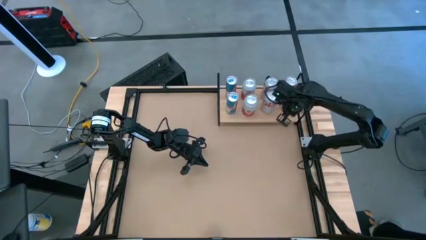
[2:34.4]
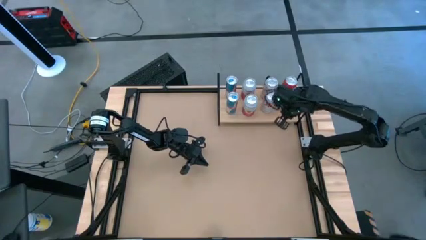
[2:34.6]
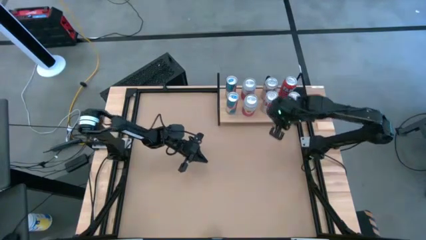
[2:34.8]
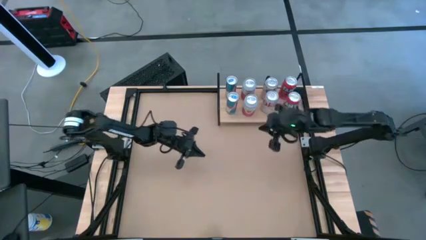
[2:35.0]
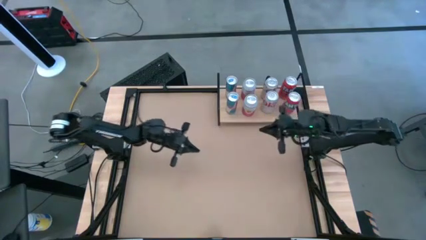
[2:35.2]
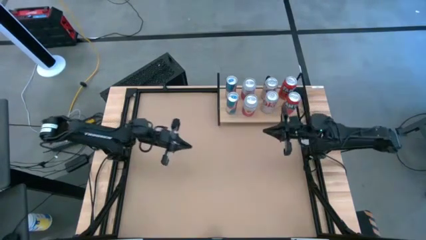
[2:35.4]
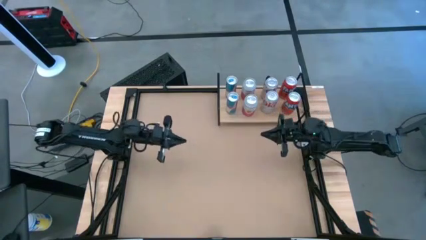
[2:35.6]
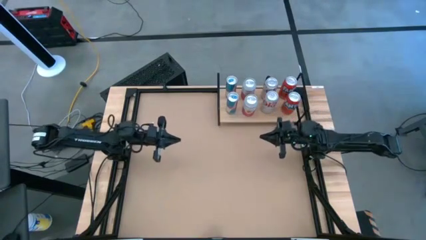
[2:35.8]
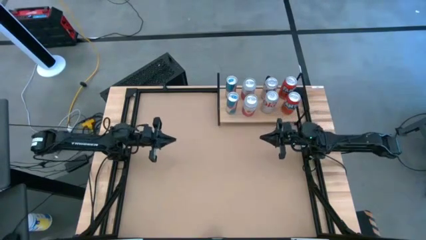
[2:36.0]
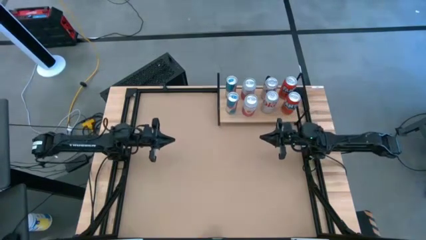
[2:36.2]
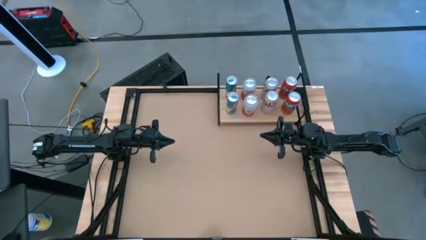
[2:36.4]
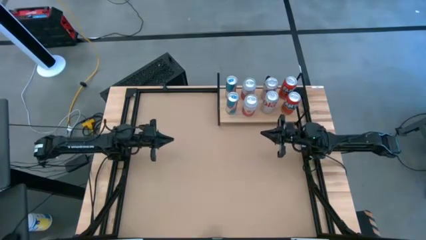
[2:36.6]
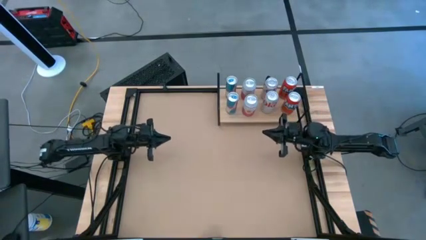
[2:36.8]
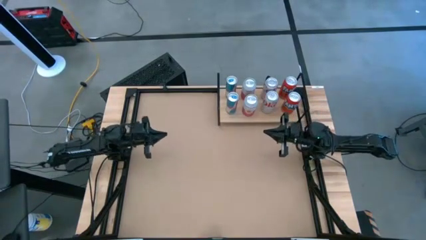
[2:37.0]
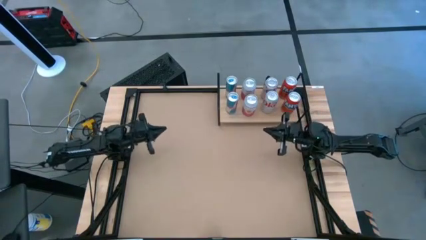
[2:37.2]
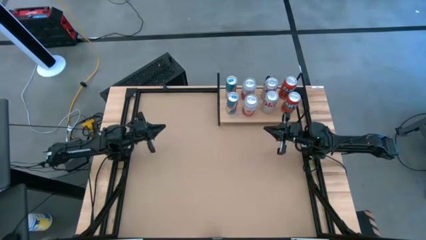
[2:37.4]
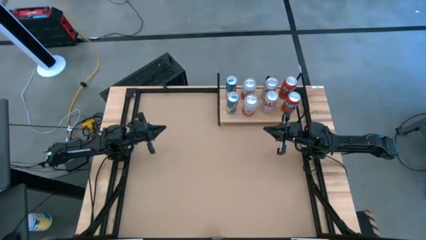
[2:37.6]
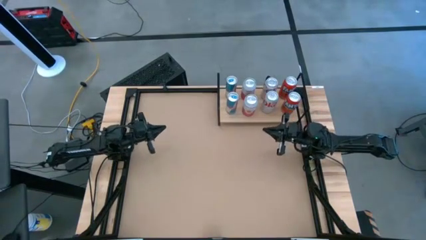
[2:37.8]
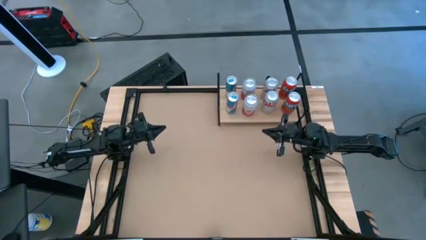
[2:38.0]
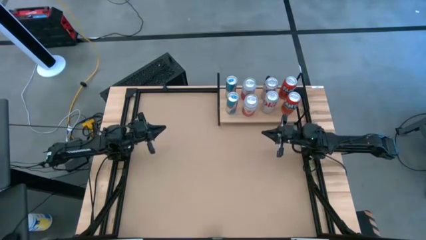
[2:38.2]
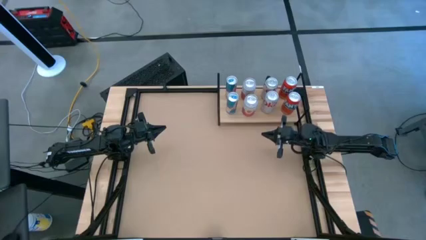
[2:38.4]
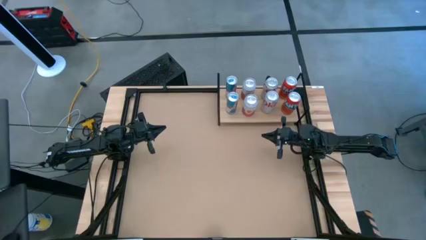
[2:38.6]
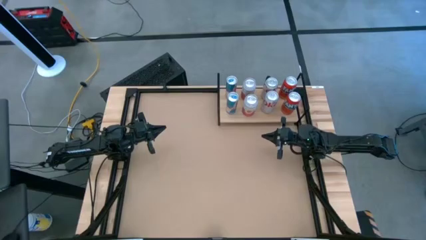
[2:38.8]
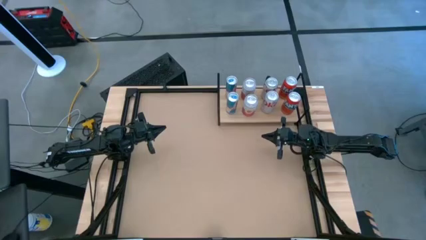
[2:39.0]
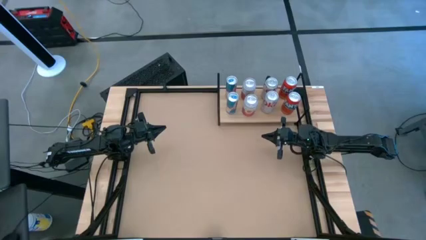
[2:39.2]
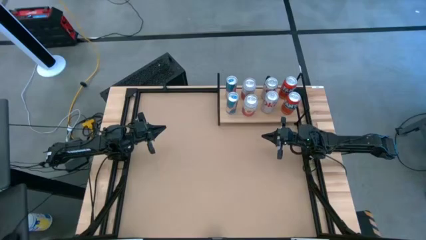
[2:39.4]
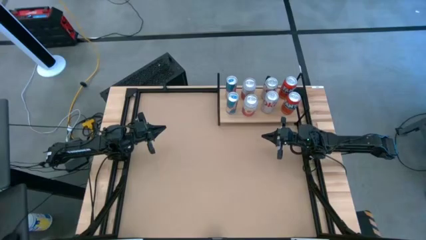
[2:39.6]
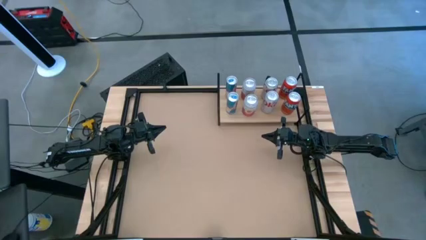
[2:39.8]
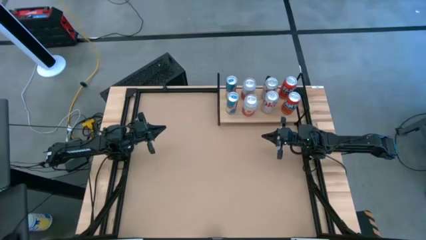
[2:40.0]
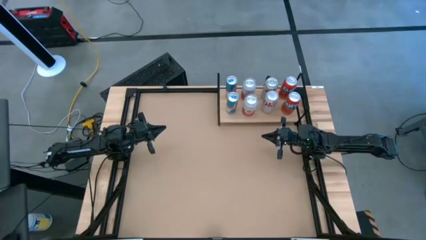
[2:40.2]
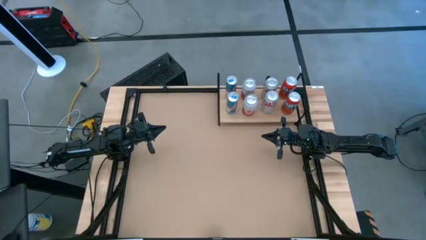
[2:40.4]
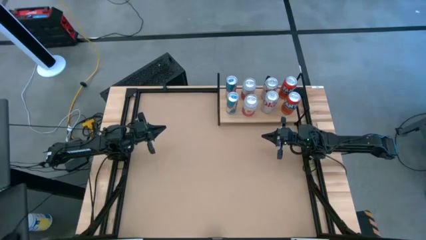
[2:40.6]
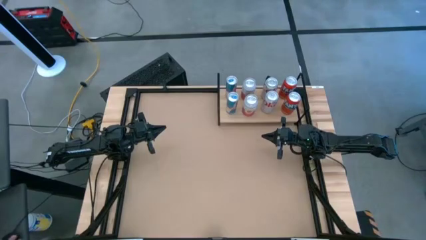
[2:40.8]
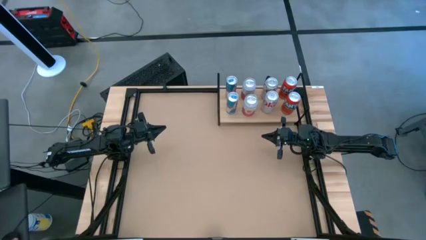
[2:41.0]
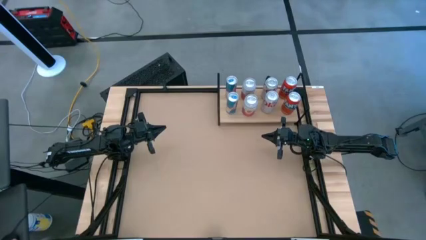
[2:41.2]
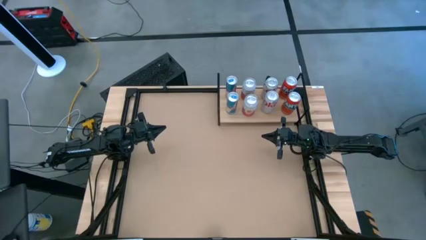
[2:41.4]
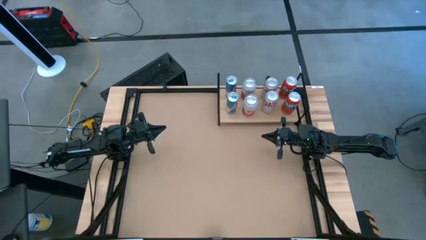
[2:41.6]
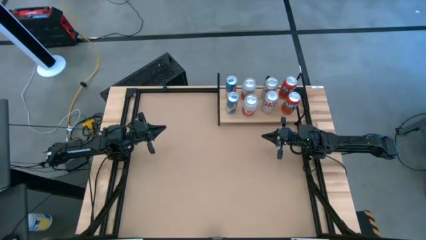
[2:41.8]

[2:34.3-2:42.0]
Task: Place canned beverage on shelf
Return to Home Position

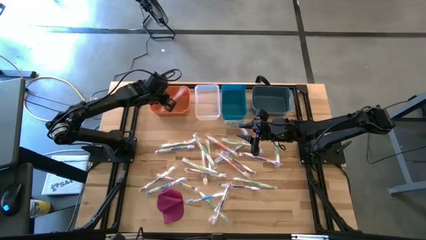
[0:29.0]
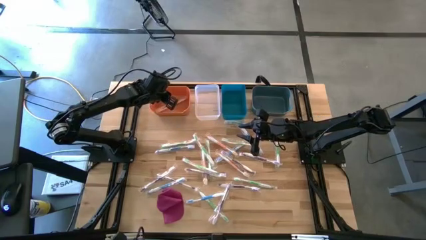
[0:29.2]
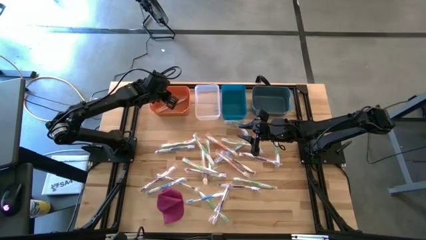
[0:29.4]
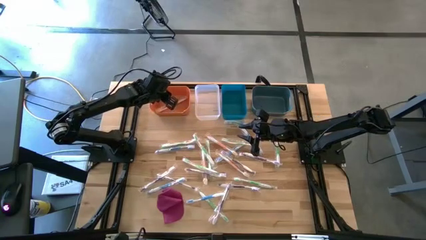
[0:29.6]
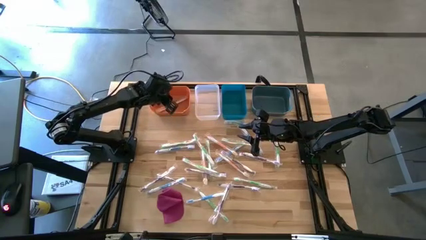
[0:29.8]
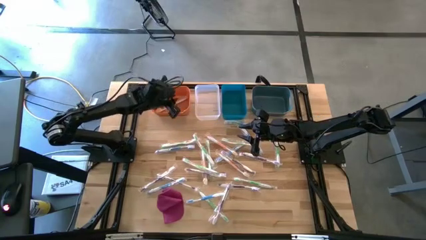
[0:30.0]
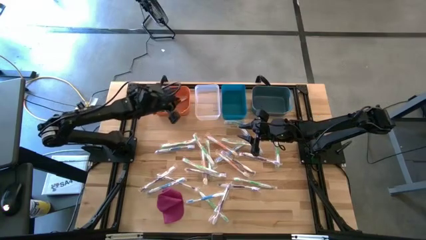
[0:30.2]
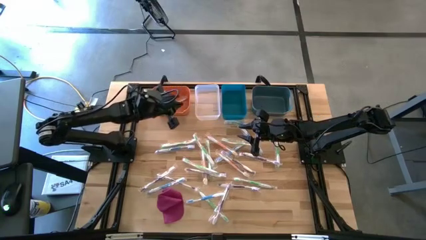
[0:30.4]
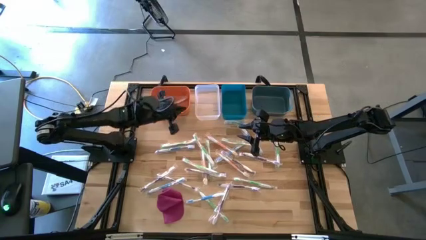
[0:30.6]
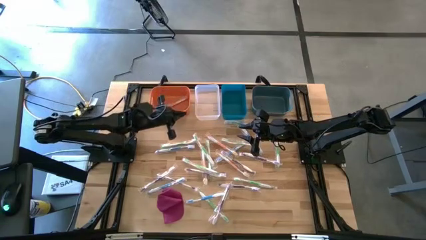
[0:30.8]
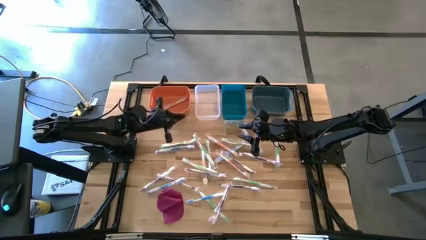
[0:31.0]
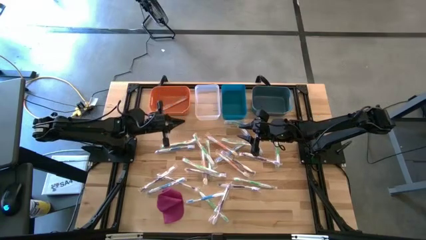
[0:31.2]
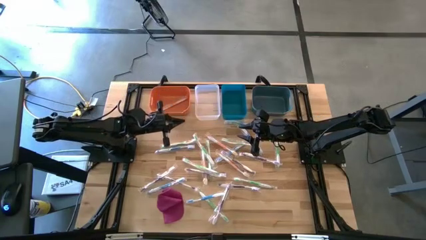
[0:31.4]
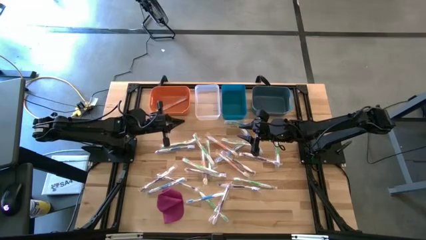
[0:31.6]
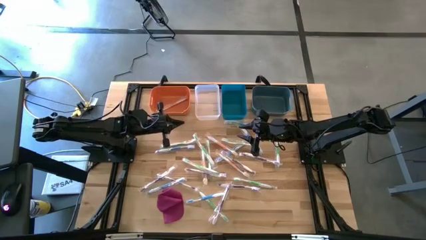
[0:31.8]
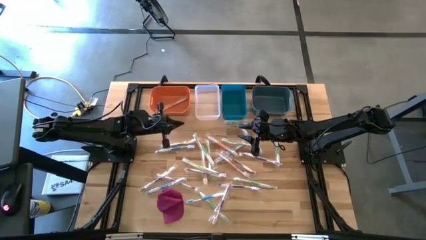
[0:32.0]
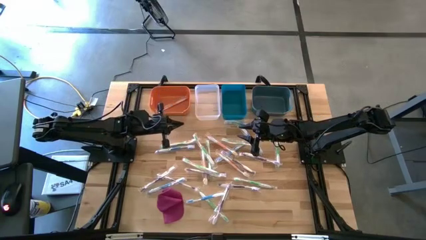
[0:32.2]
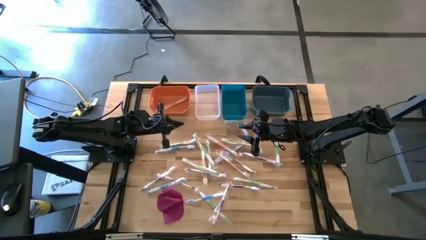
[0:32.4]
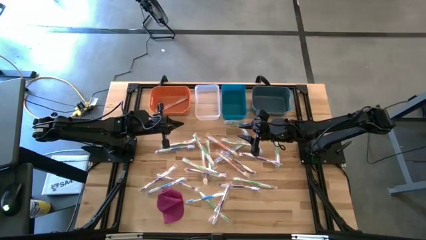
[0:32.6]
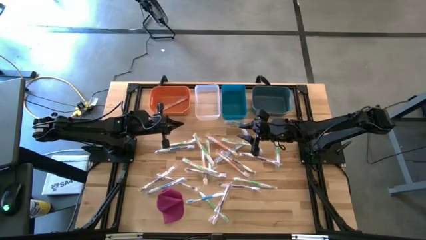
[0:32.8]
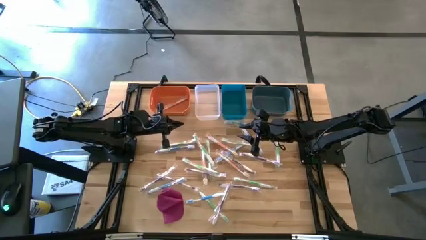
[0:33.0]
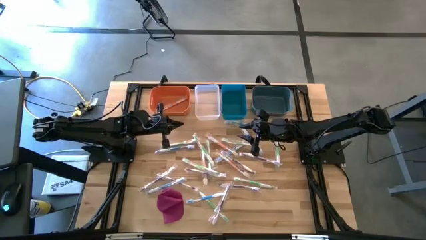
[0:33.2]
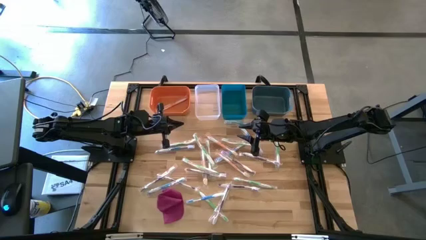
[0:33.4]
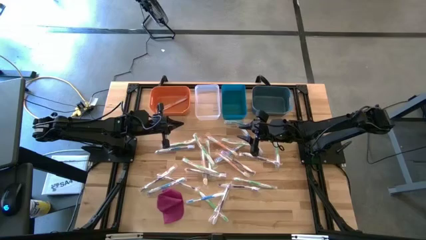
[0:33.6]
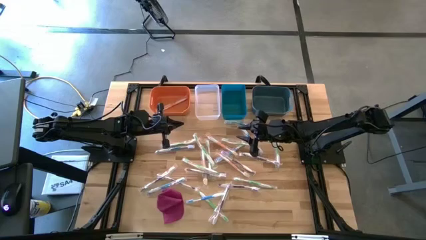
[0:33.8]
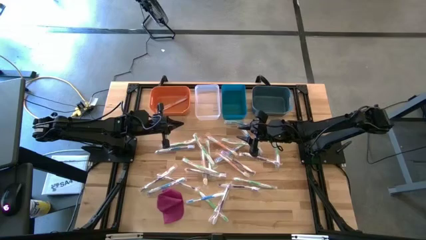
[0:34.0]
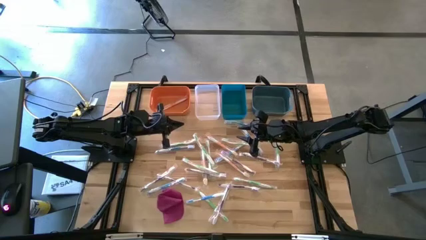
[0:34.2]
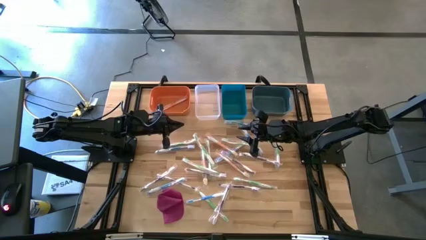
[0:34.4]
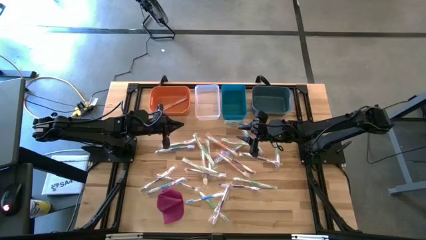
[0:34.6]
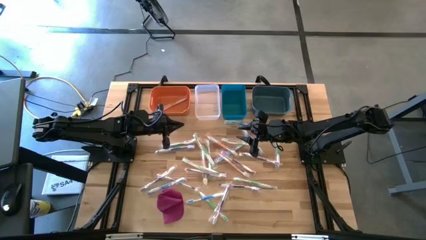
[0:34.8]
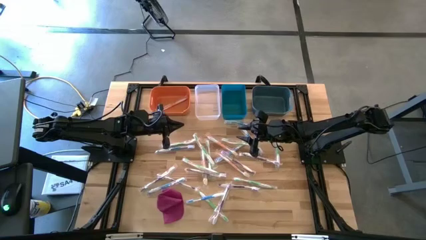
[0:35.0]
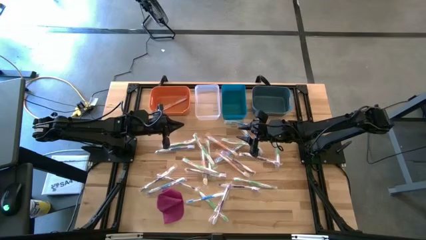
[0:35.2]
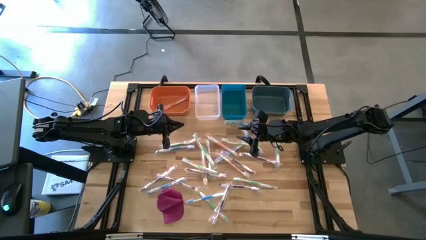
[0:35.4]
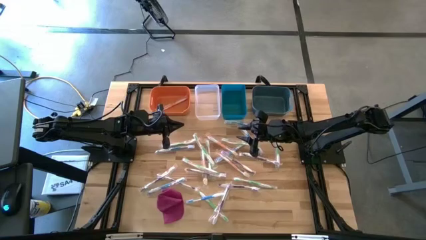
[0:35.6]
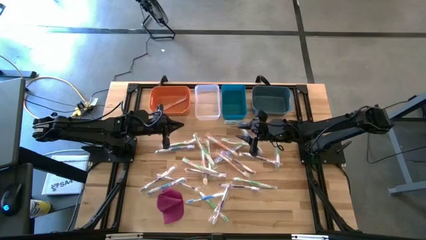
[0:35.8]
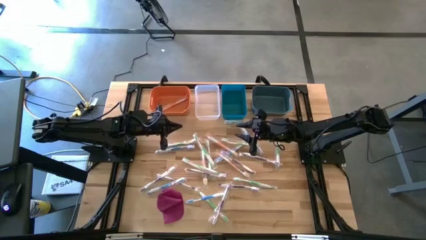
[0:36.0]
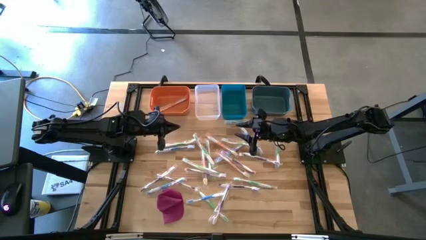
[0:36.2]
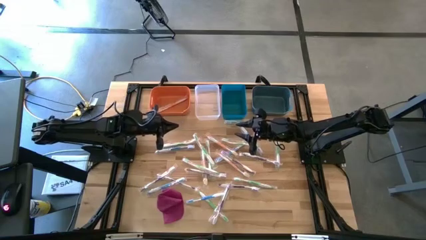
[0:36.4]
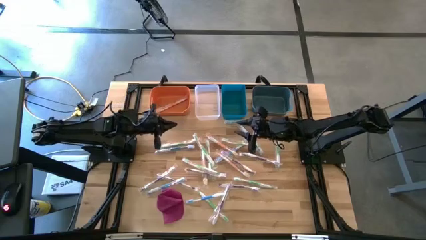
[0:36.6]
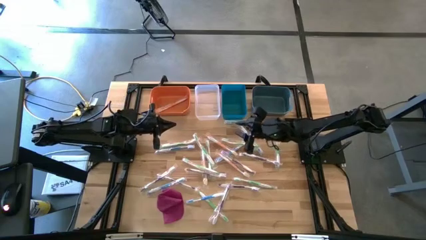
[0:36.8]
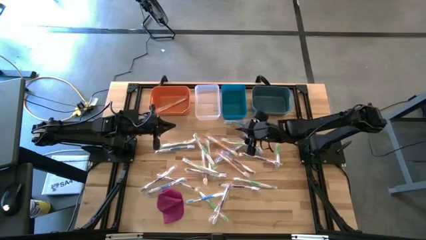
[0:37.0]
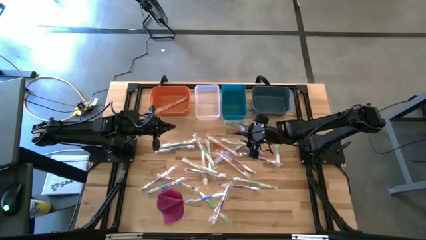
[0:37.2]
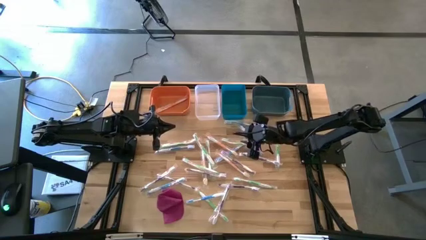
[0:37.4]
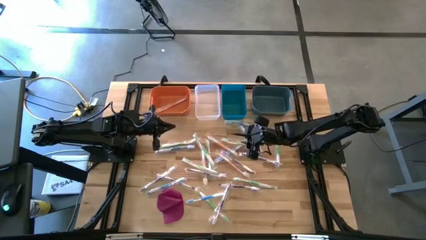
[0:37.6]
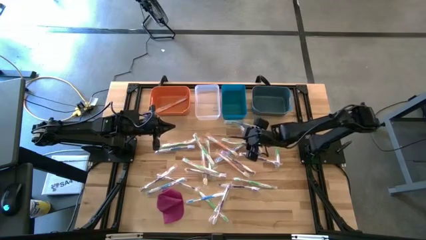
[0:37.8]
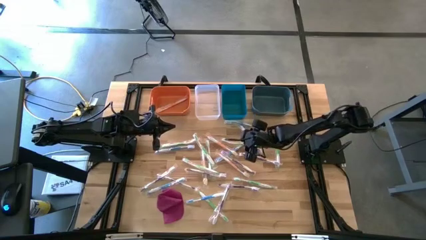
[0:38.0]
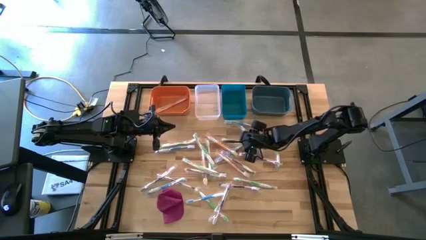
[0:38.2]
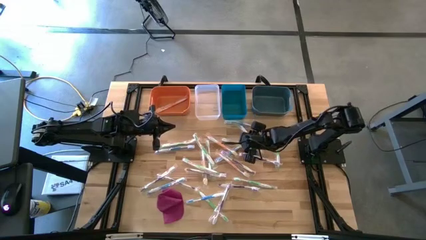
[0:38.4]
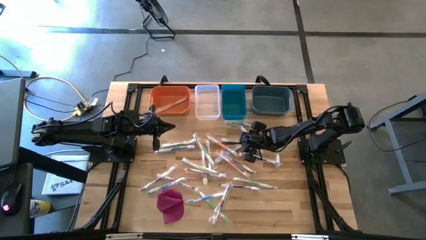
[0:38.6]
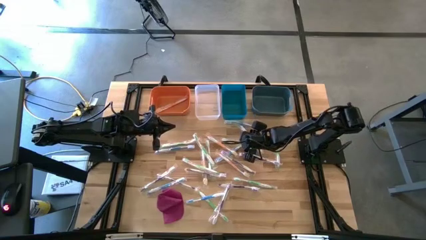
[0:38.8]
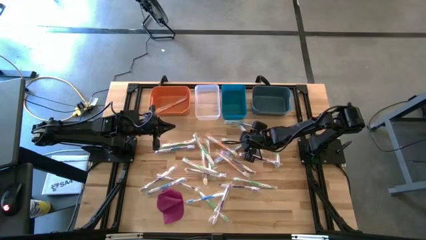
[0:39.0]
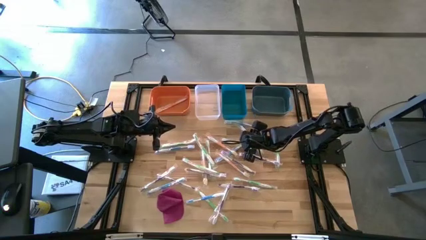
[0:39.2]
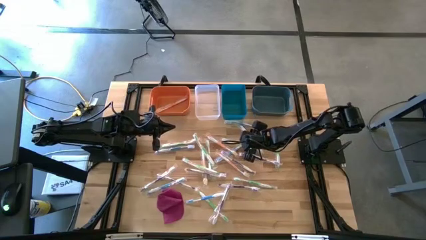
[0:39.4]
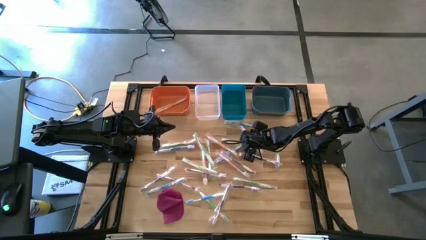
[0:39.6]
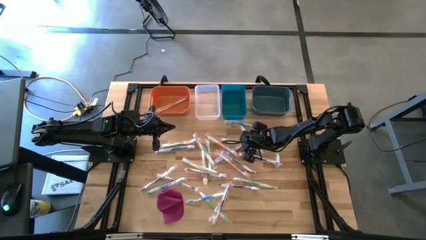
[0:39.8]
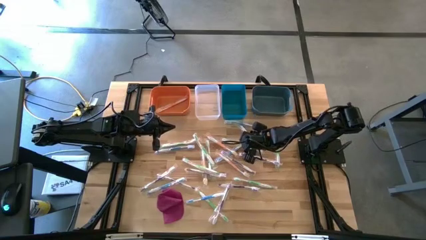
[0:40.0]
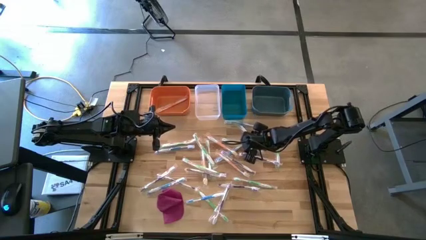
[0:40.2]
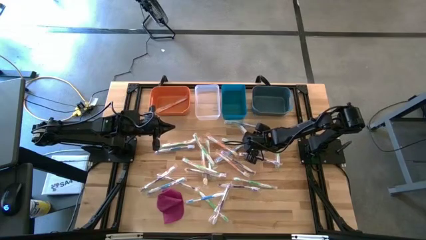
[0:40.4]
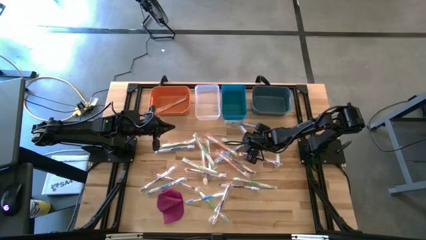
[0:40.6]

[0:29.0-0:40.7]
Task: Pick & Place Toothbrushes
Put the green toothbrush into the transparent bin
